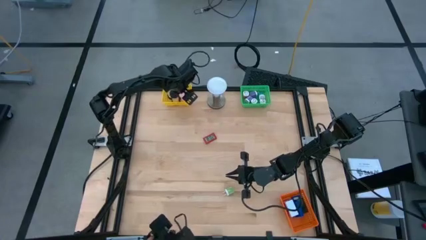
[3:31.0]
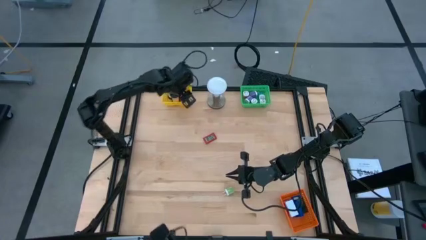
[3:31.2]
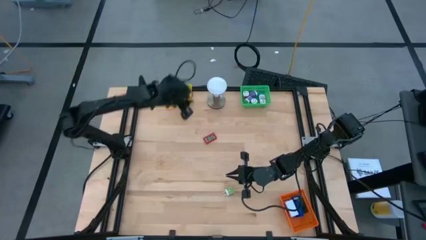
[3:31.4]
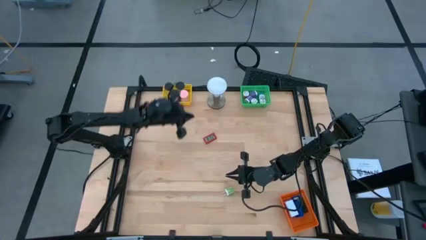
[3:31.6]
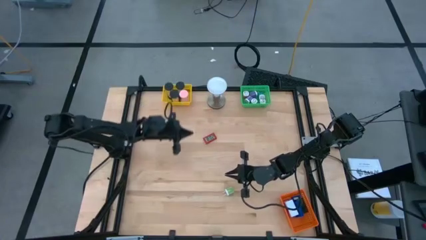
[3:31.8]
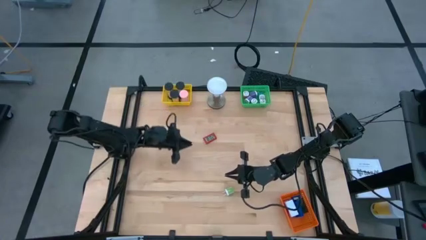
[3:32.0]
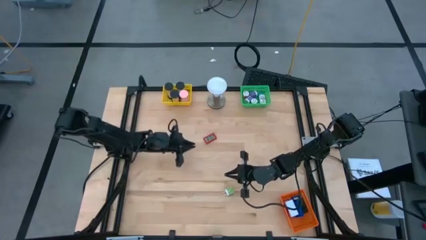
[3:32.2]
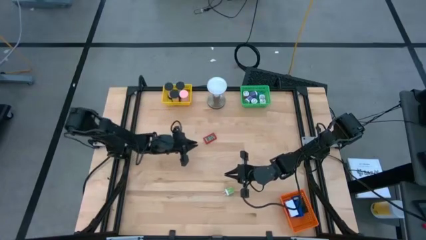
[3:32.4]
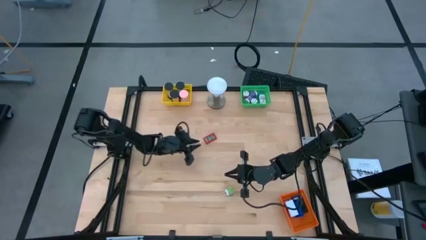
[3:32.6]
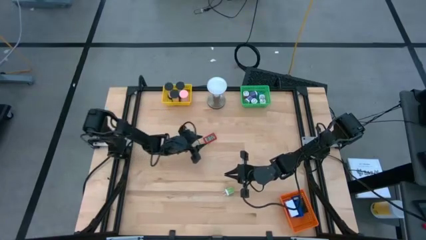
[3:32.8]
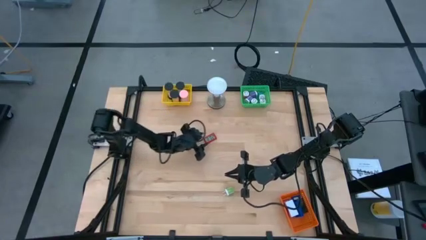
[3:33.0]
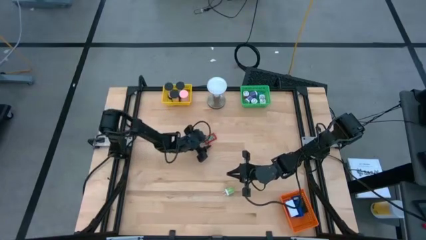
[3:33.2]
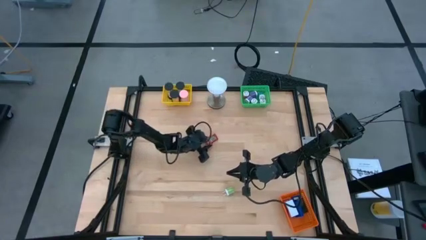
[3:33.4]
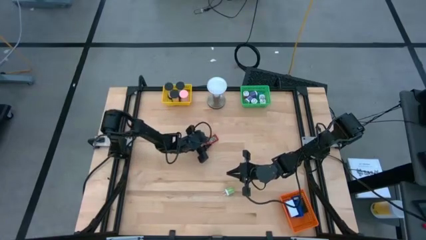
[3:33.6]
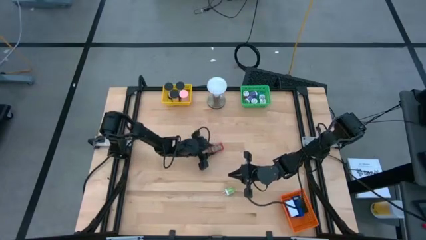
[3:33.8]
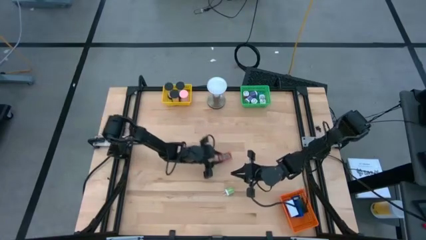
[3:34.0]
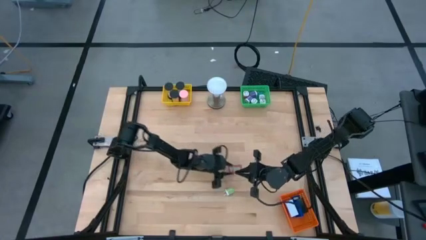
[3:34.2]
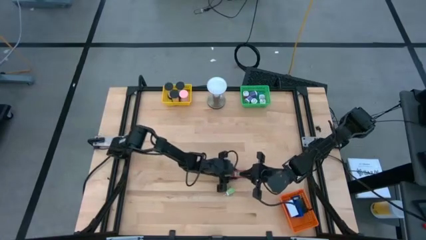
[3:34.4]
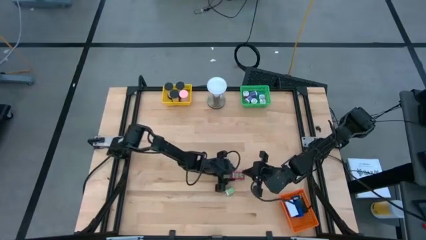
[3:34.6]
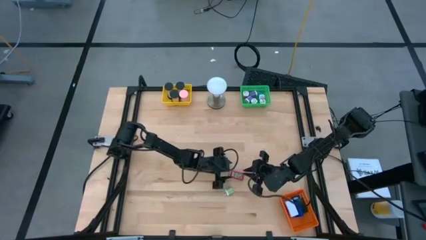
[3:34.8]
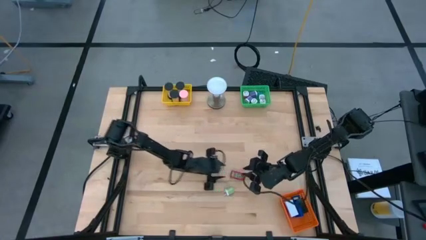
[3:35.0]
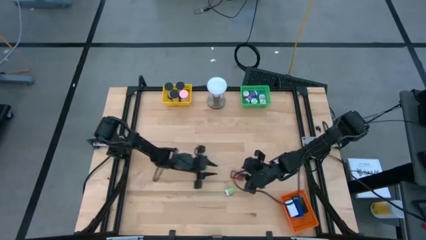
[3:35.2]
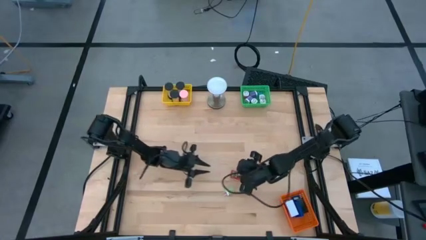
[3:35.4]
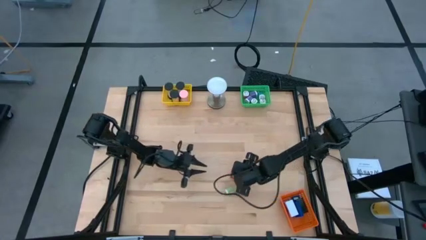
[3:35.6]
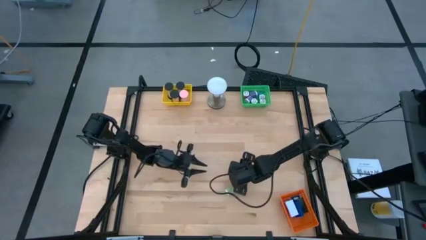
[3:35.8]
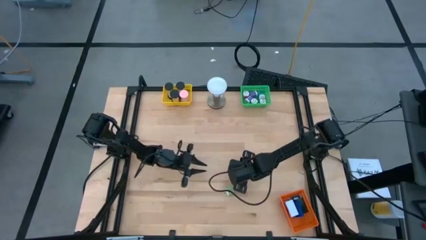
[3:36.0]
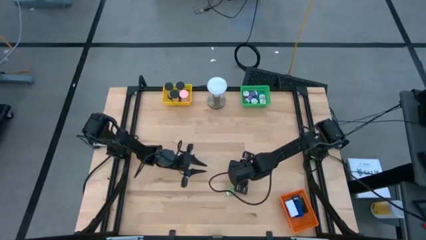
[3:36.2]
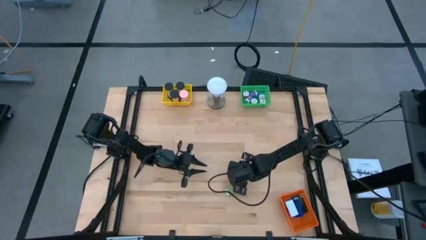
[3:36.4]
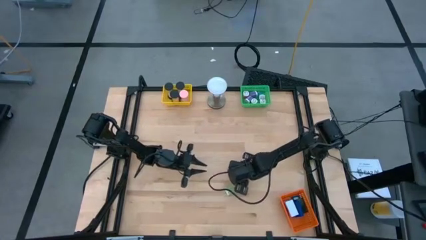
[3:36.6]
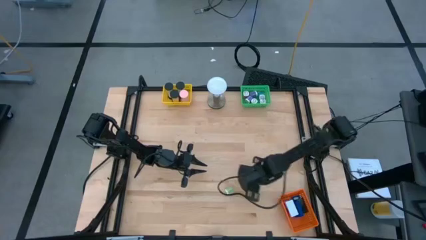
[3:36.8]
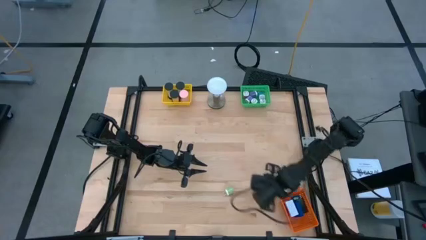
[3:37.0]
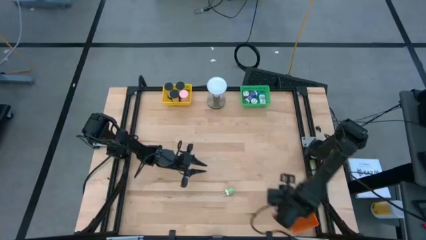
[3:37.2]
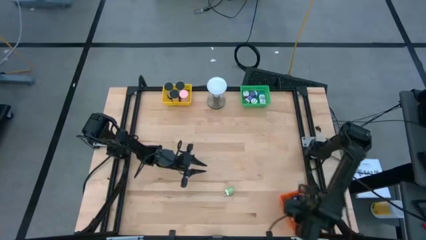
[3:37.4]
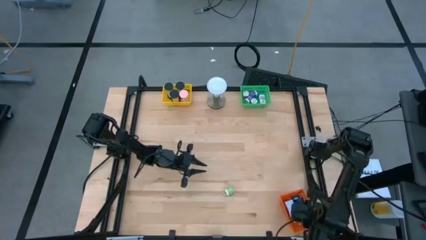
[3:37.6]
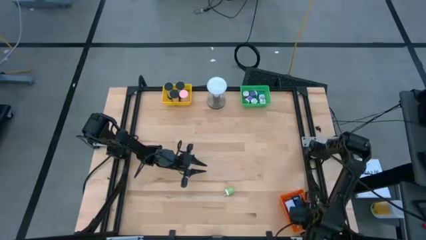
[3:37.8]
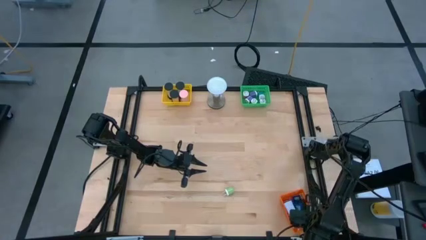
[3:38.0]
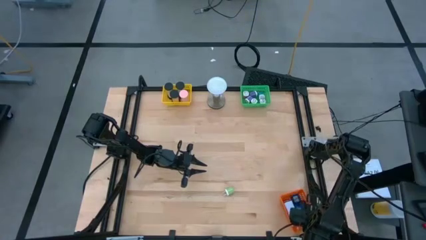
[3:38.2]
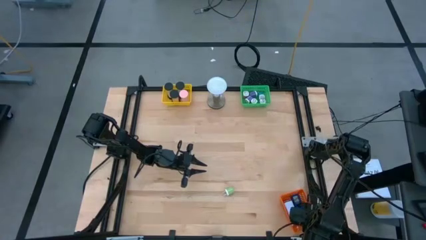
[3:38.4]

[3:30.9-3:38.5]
Task: Pick & Place Office items
Put the red digital timer into the orange bin

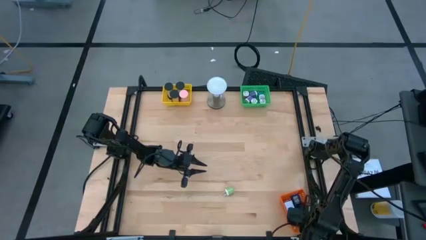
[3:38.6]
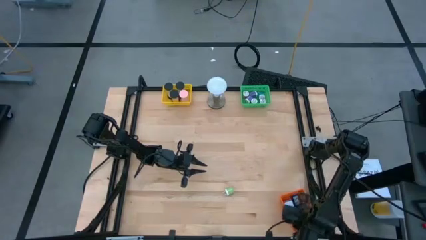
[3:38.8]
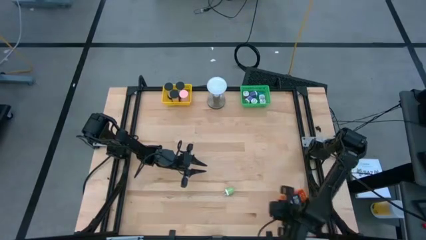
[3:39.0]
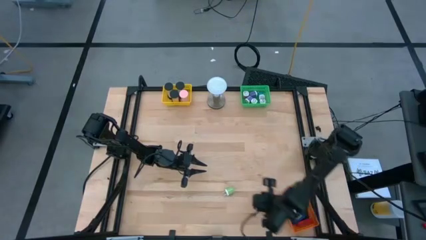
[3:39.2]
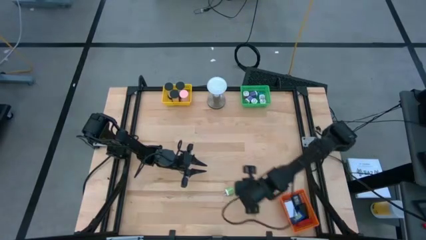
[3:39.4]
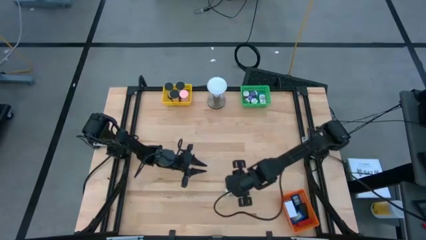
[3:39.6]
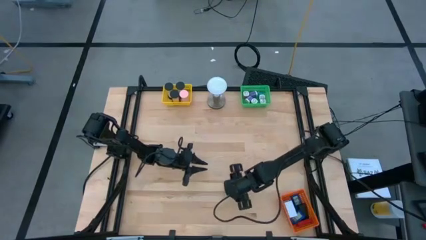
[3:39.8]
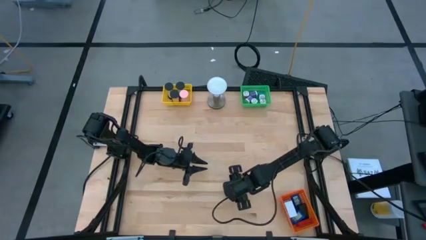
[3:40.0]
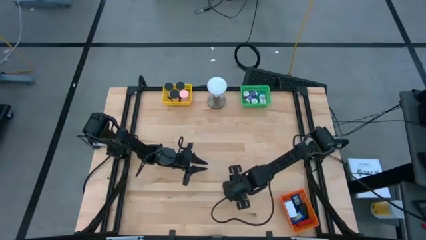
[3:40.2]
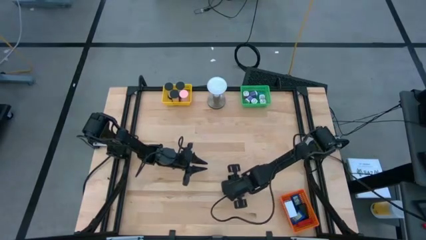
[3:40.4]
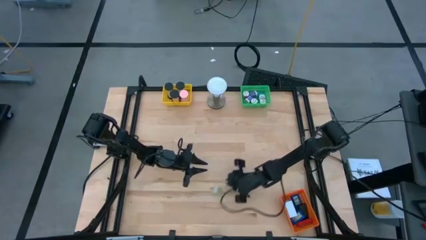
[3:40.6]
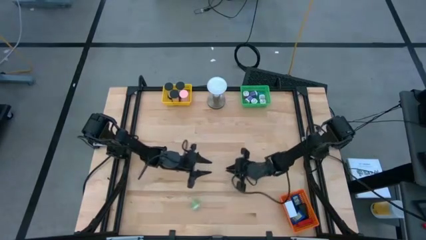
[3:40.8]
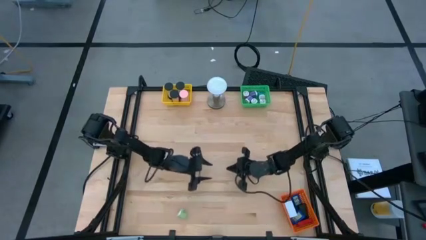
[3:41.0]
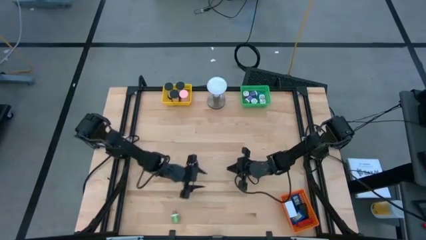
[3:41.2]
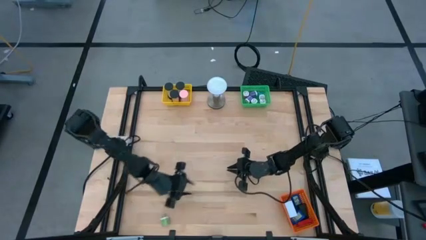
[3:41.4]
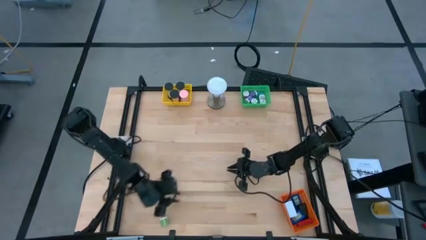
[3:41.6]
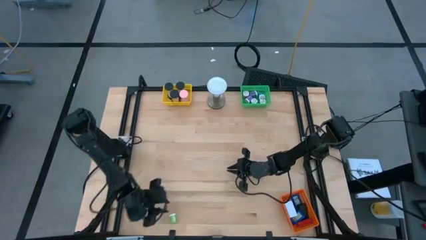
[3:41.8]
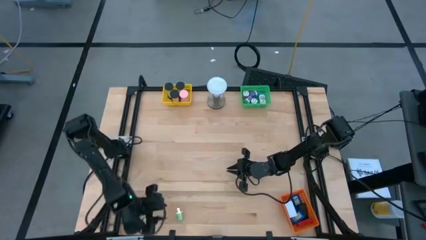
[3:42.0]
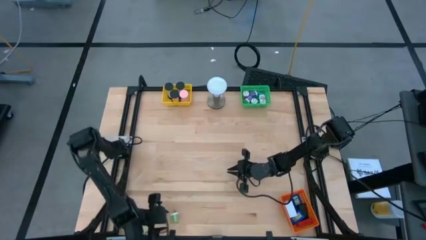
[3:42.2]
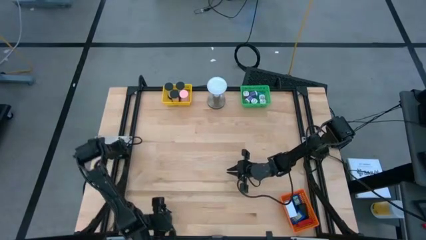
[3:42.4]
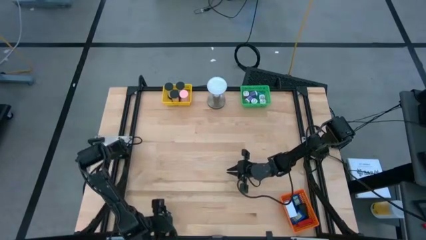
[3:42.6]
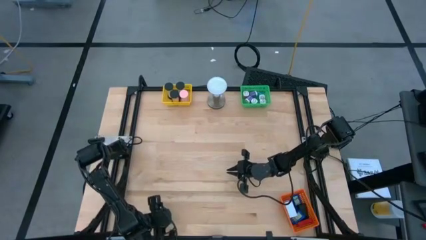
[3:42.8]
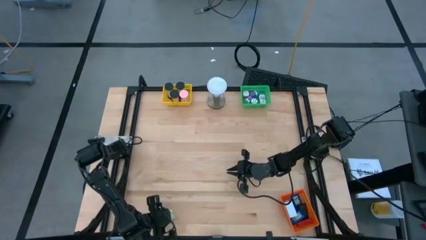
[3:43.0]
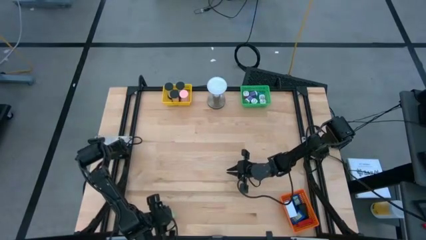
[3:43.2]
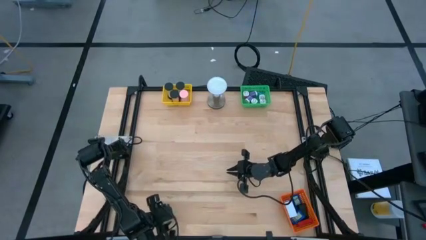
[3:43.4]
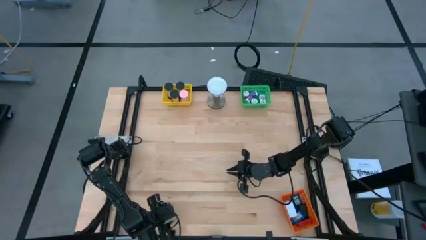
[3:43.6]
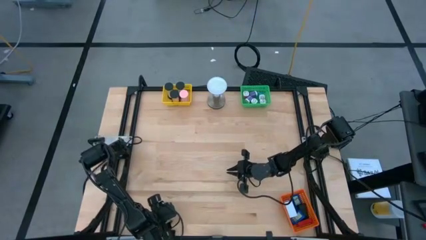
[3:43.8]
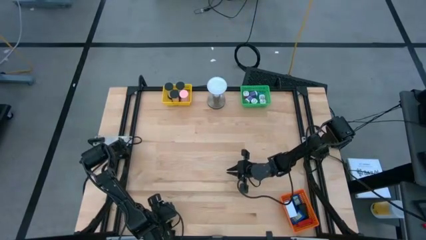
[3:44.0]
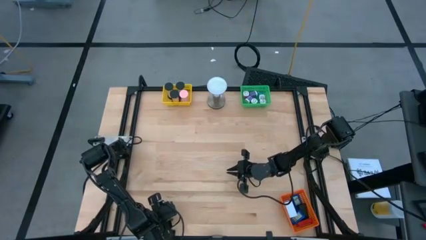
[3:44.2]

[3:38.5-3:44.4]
Put the green charger adapter into the green bin
